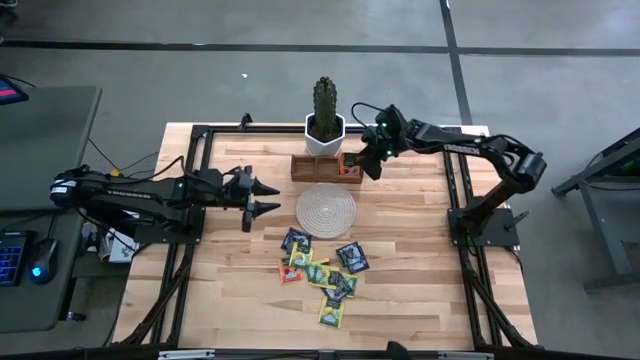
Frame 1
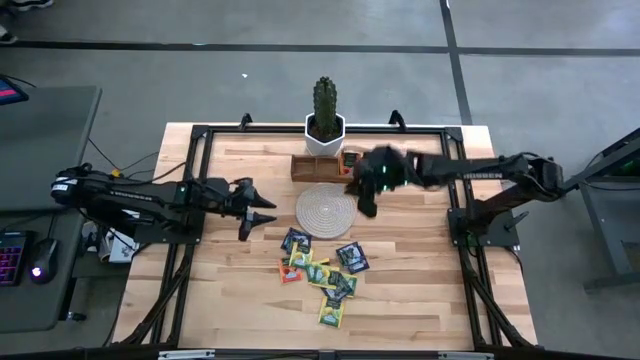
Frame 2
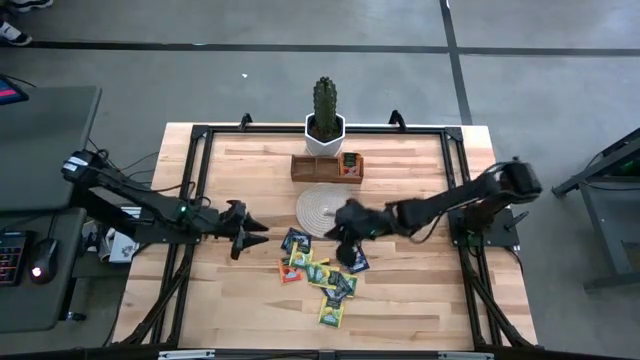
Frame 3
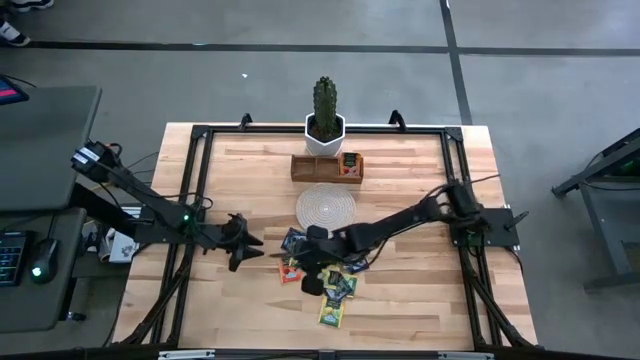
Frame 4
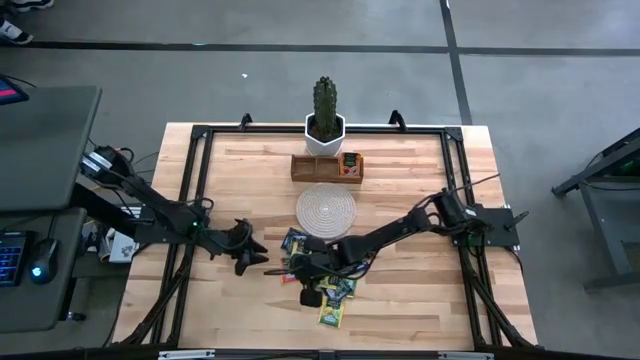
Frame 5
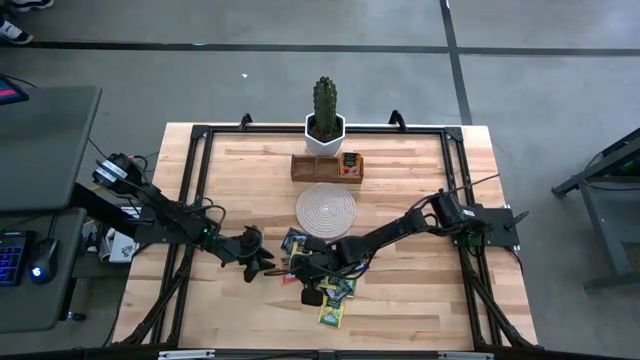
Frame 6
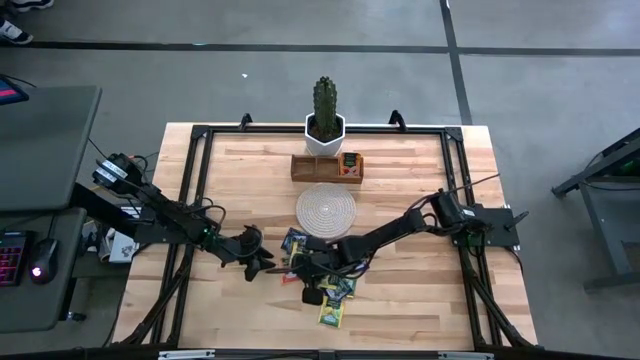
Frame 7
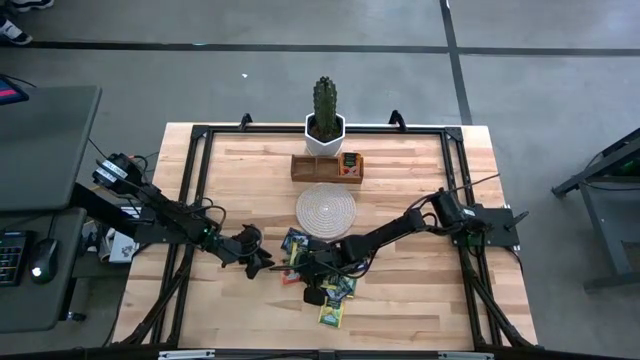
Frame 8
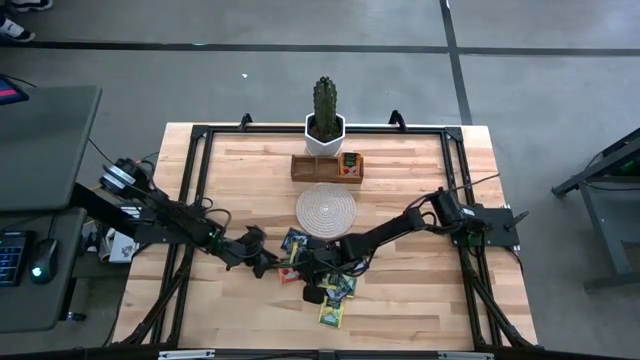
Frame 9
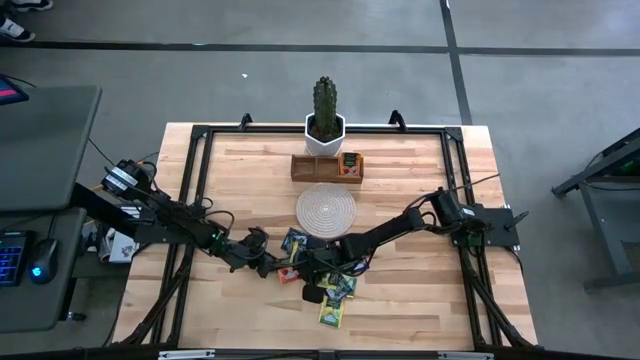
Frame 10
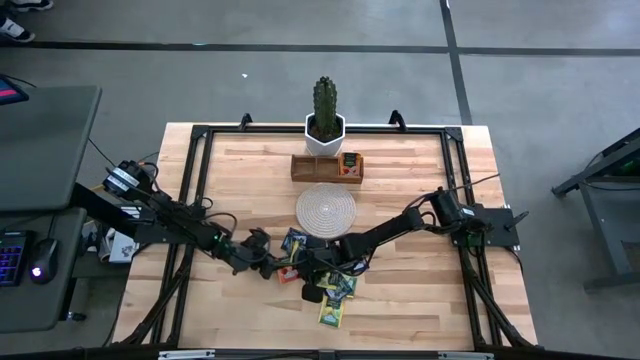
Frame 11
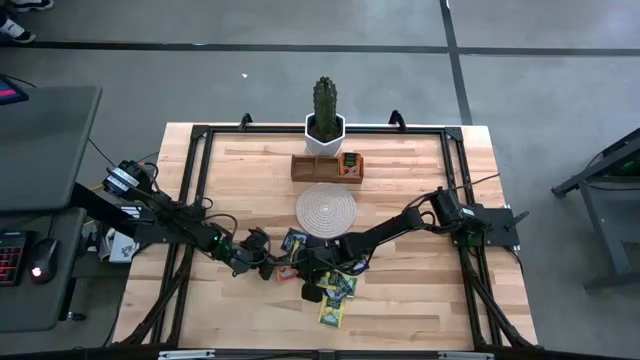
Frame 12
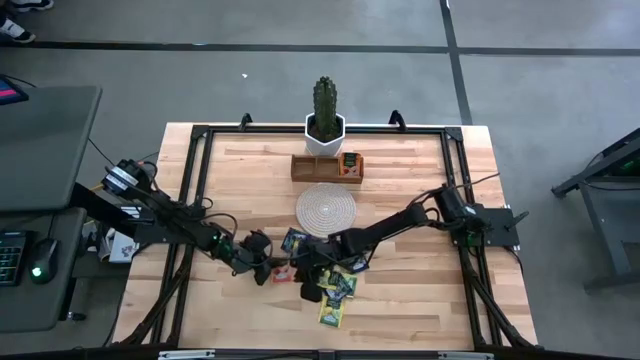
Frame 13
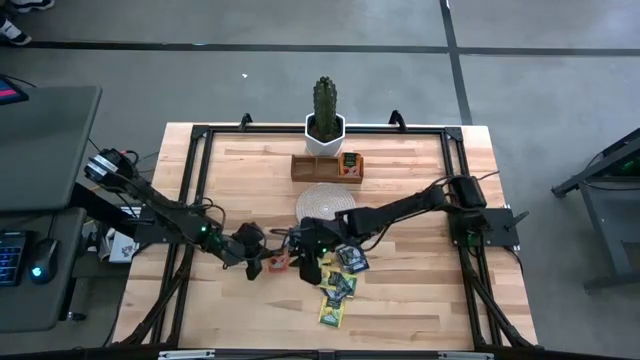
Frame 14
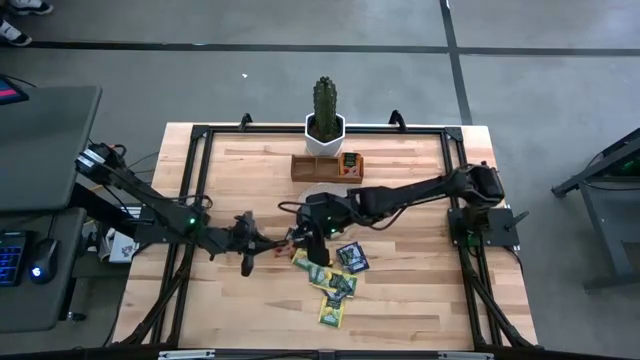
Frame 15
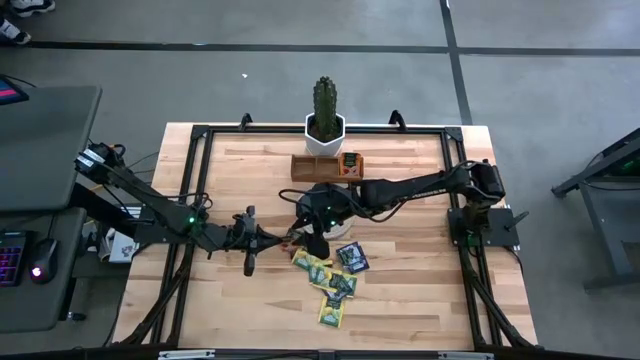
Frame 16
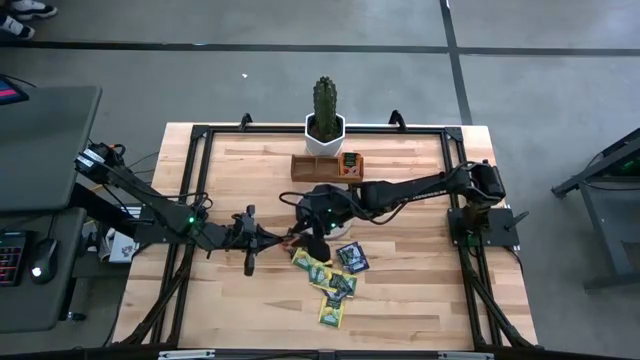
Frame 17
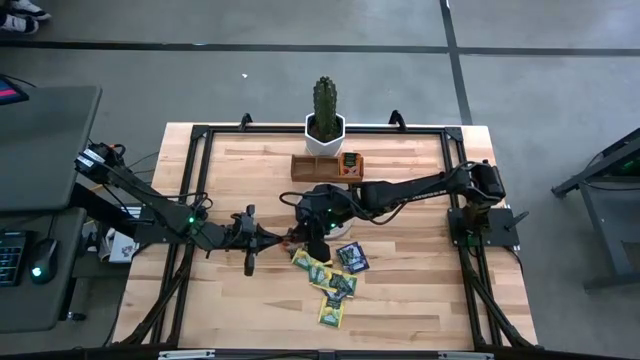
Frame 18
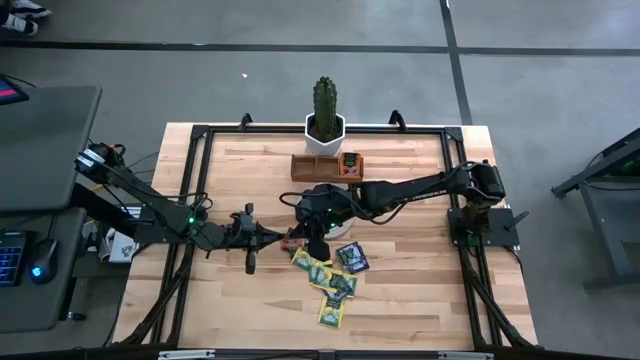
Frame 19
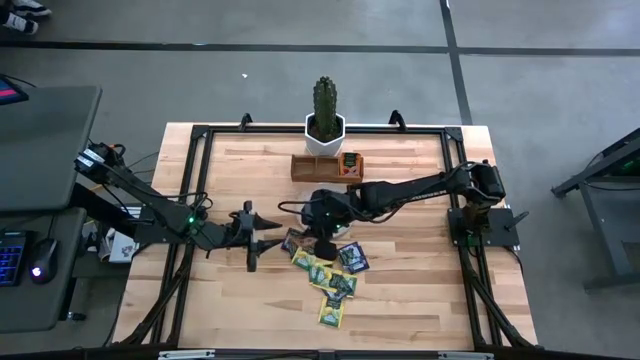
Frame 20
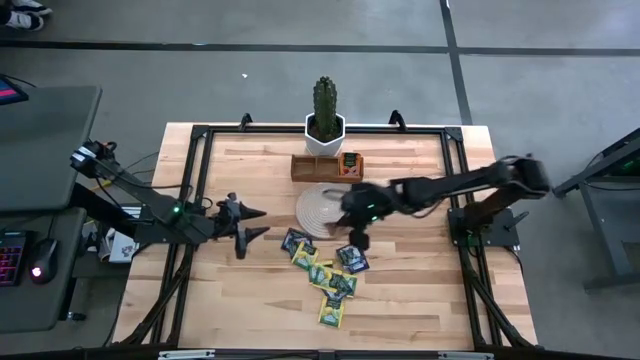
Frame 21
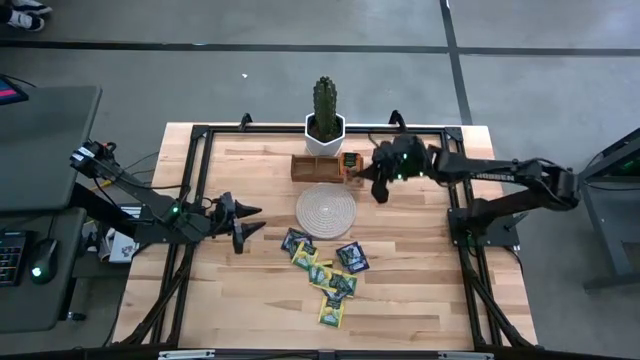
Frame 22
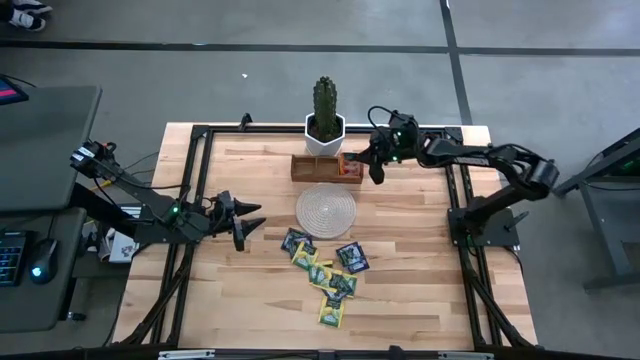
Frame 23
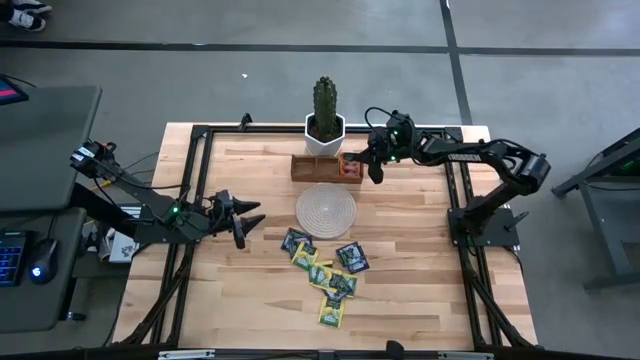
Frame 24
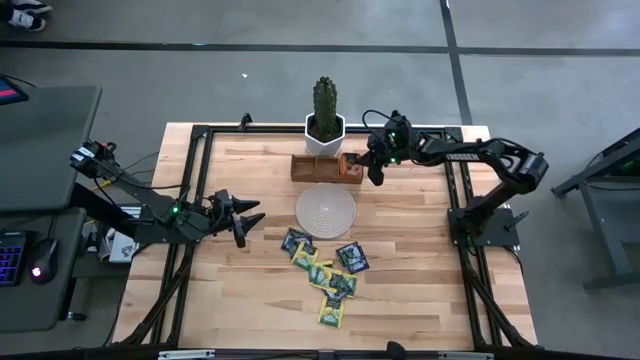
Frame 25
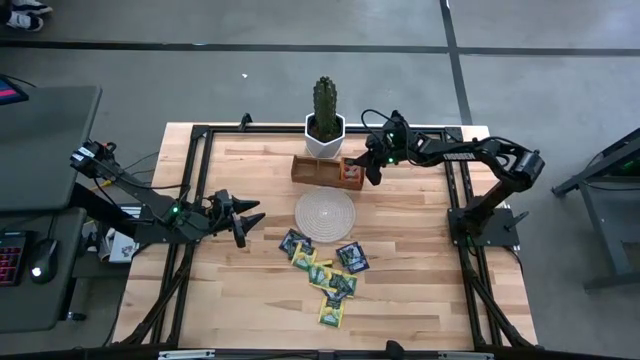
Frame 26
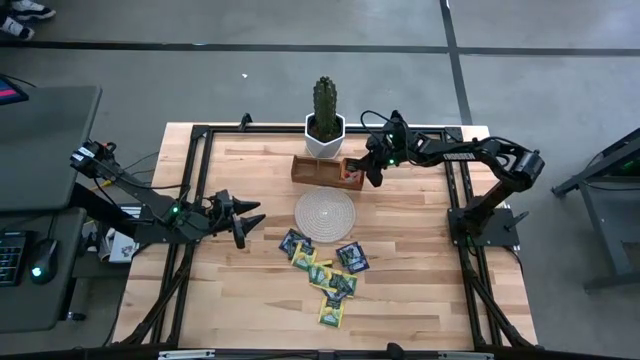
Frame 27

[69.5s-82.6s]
Task: Pick & Place Tea
Put the orange tea bag into the right section of the wooden organizer

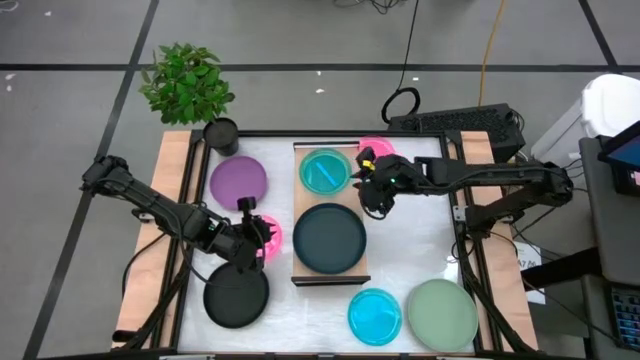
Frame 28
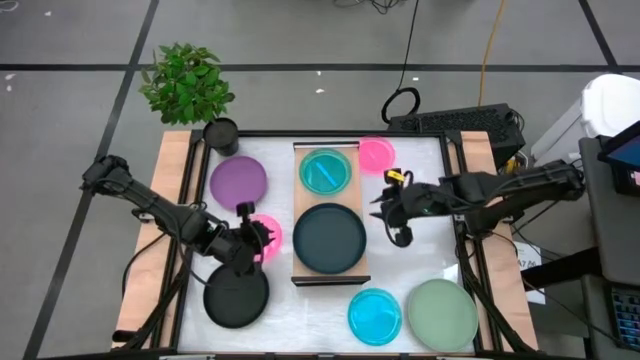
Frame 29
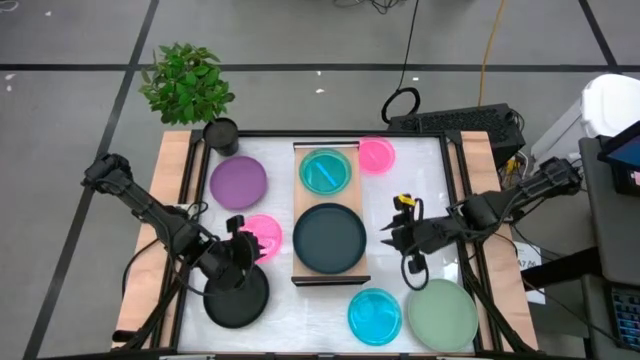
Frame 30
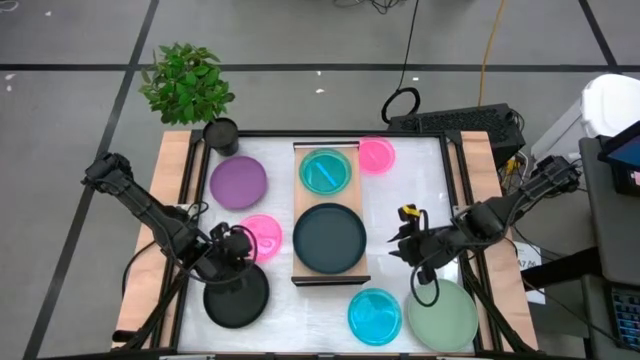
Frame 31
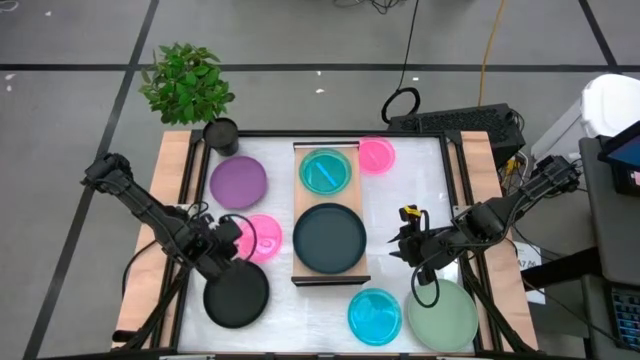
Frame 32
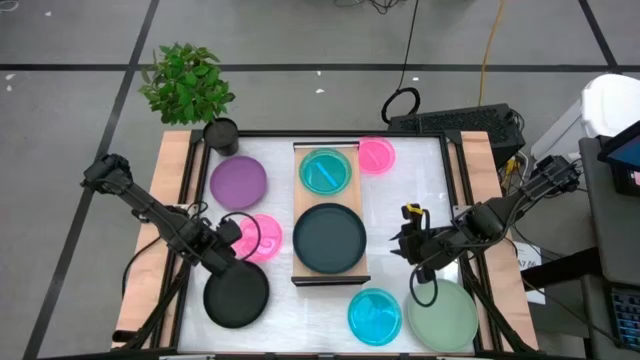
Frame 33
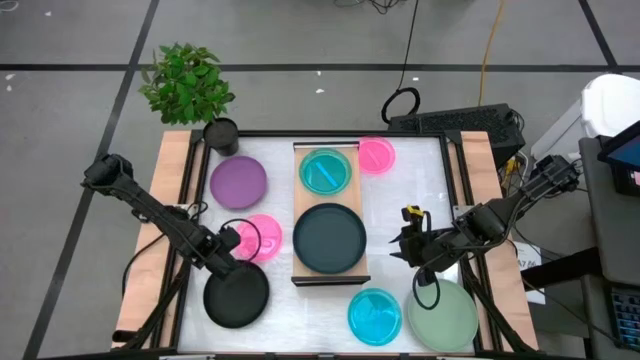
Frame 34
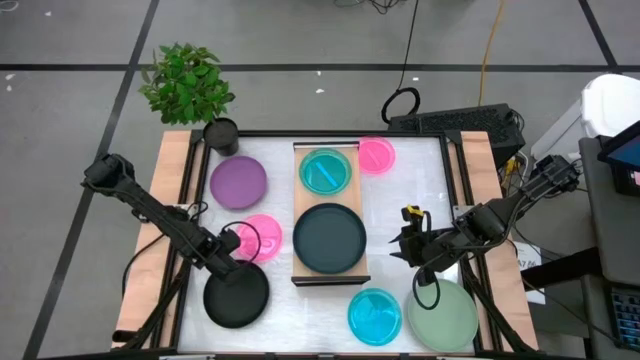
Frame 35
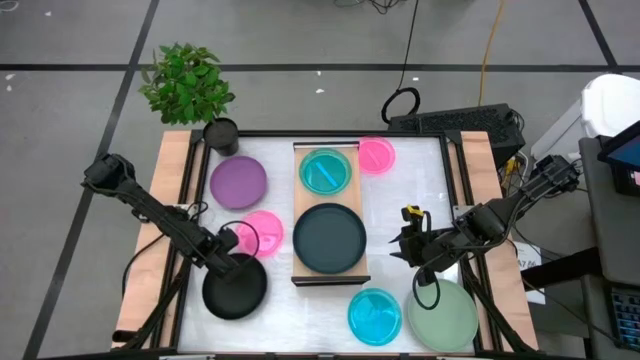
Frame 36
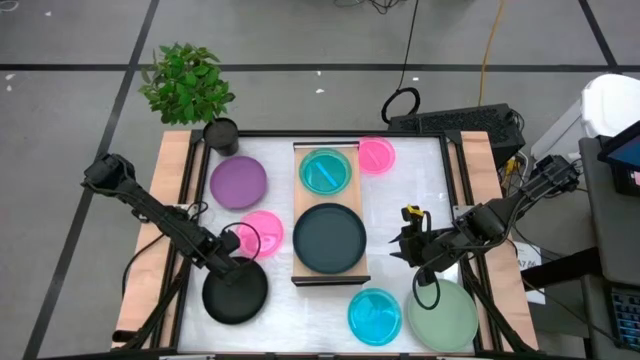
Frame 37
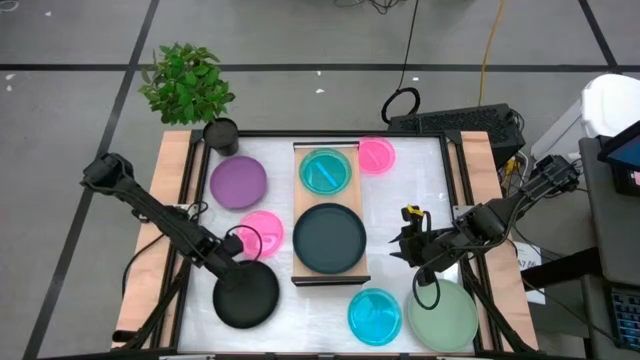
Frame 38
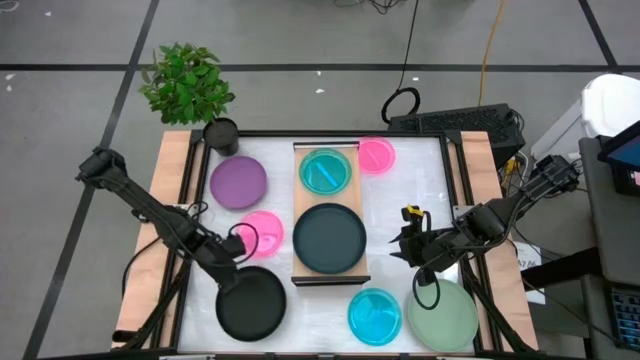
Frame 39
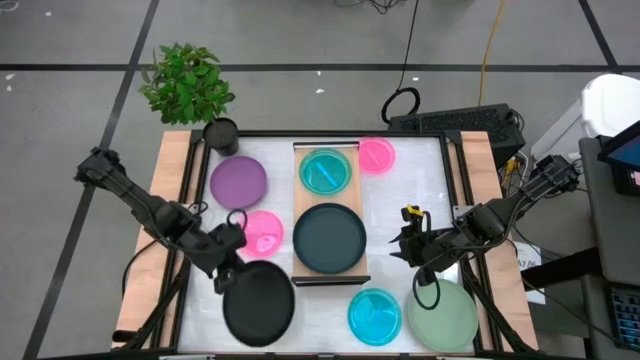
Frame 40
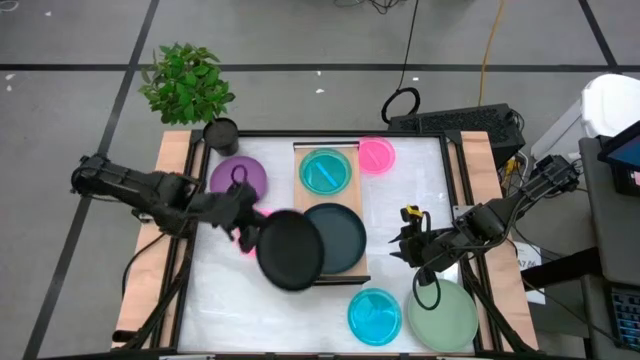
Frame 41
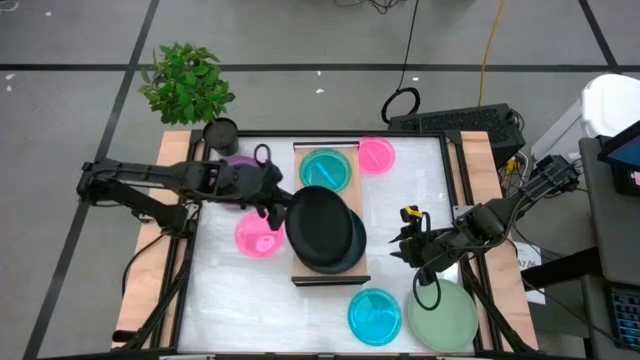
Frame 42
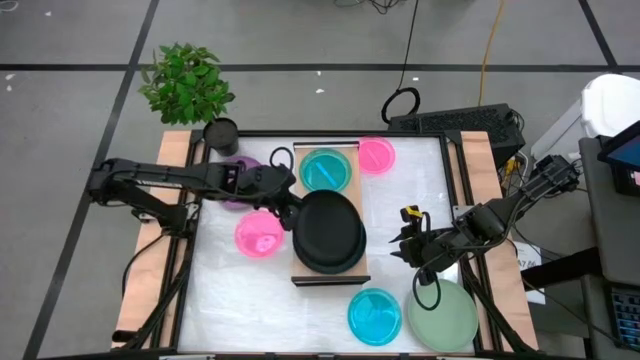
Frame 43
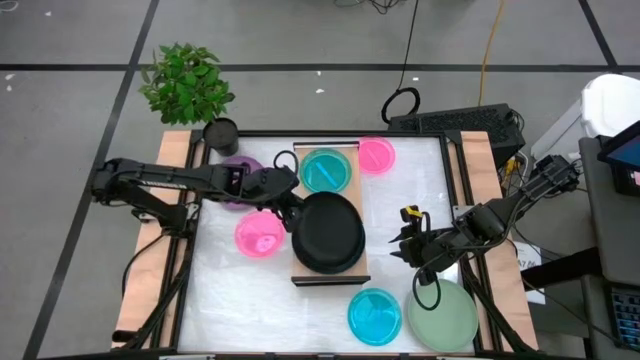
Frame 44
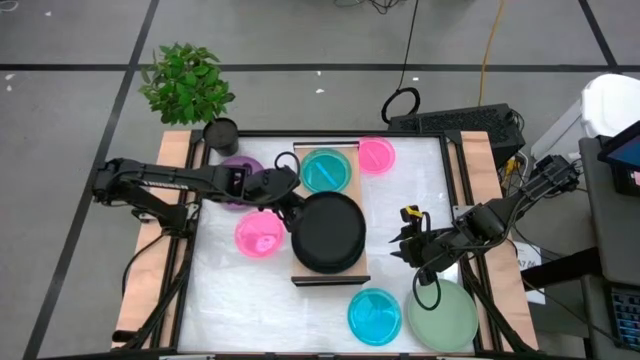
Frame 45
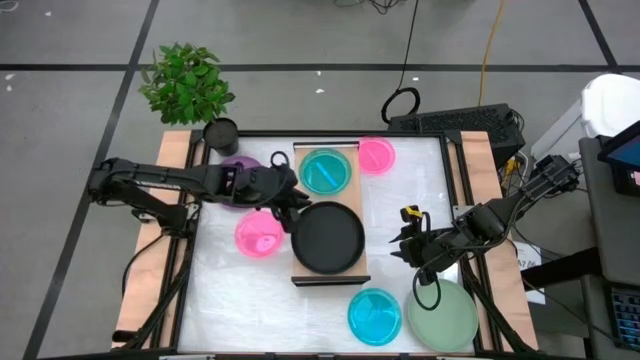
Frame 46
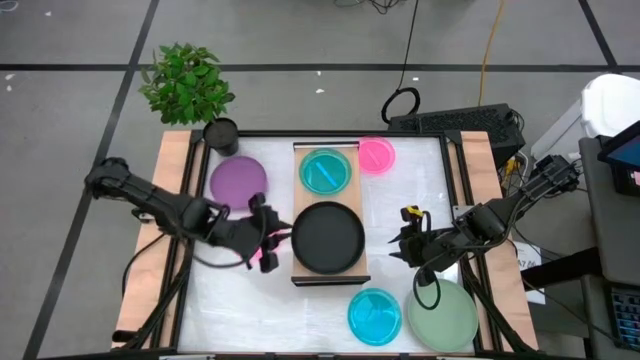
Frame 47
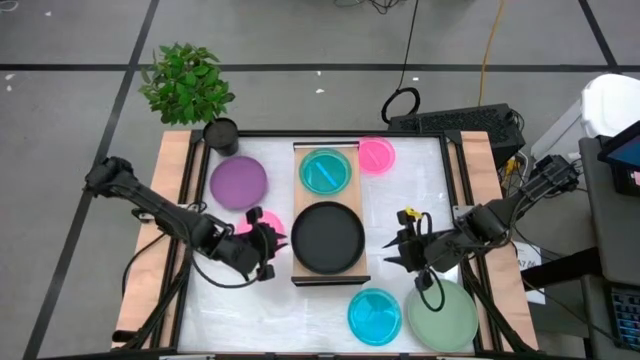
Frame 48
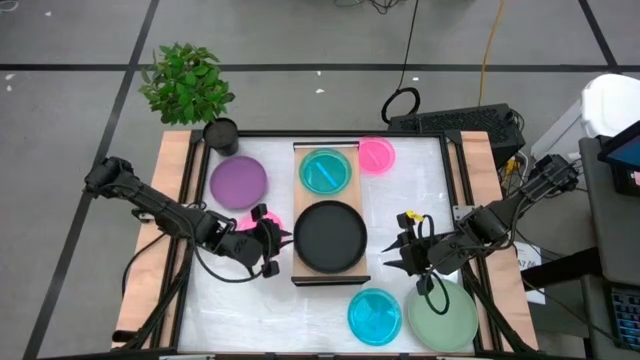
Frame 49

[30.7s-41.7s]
Task: Place and stack plates onto a shelf
Stack the black plate on top of the dark green plate
